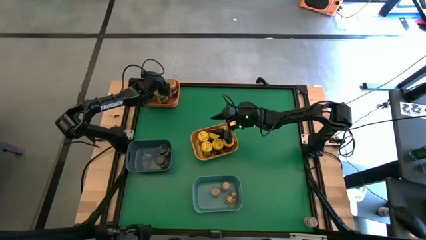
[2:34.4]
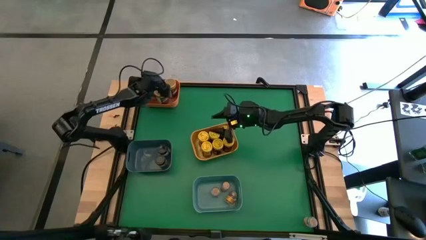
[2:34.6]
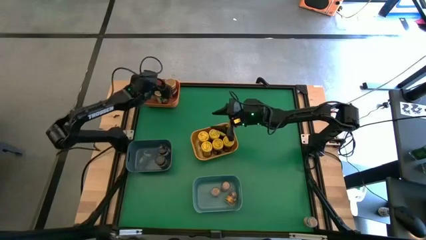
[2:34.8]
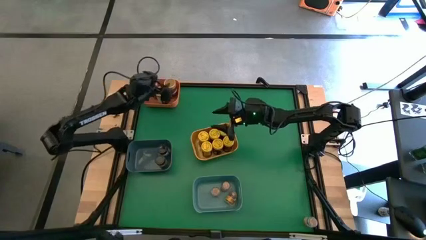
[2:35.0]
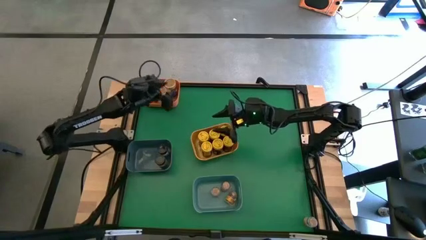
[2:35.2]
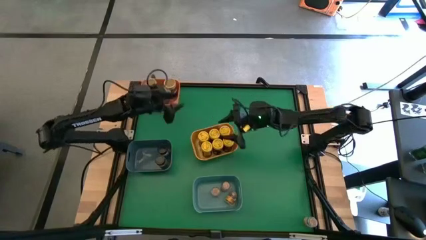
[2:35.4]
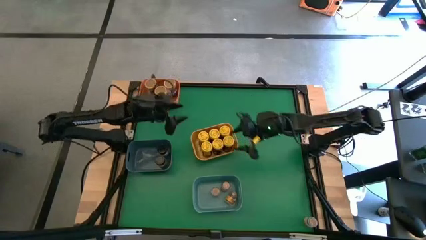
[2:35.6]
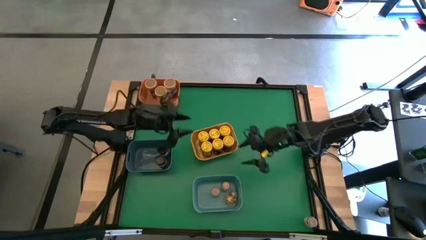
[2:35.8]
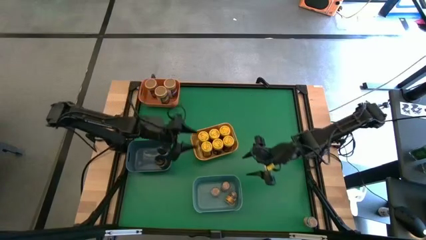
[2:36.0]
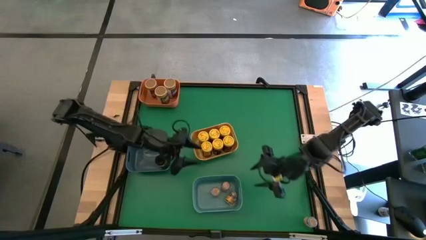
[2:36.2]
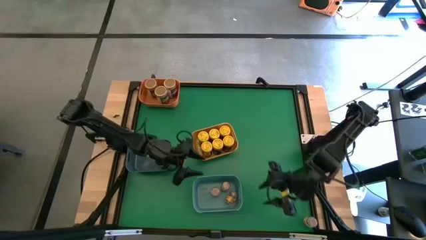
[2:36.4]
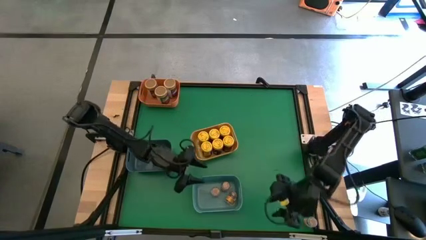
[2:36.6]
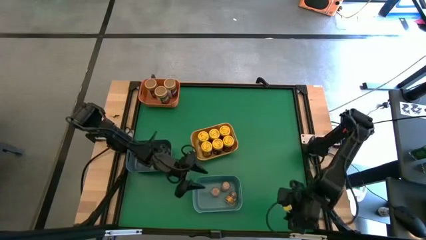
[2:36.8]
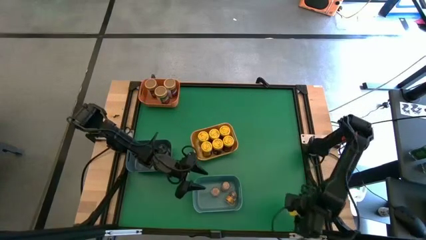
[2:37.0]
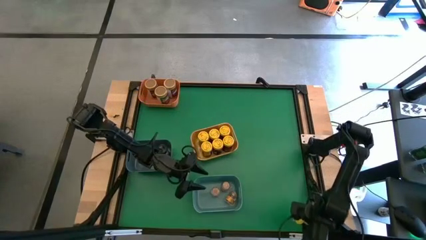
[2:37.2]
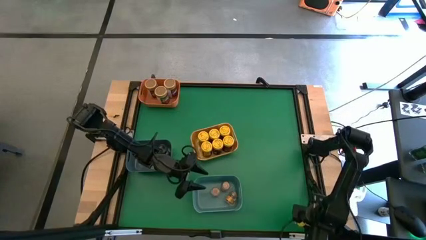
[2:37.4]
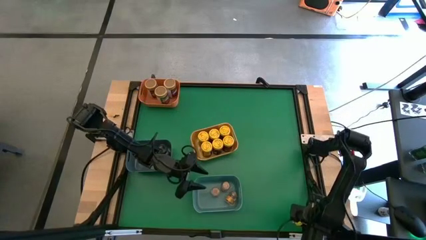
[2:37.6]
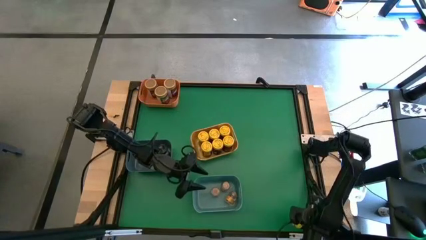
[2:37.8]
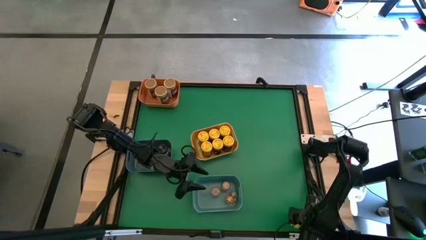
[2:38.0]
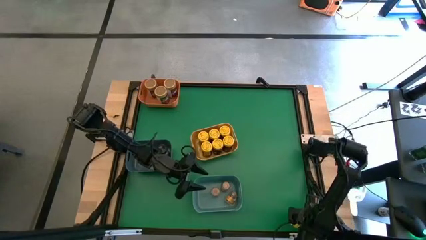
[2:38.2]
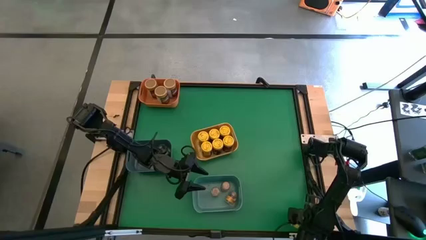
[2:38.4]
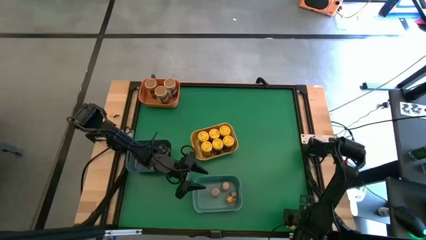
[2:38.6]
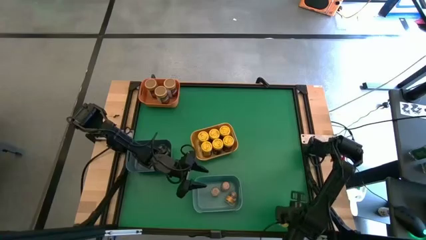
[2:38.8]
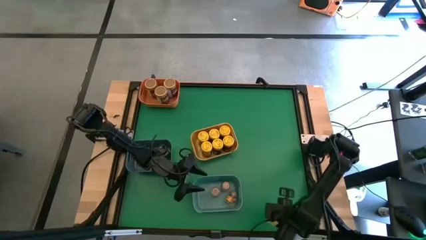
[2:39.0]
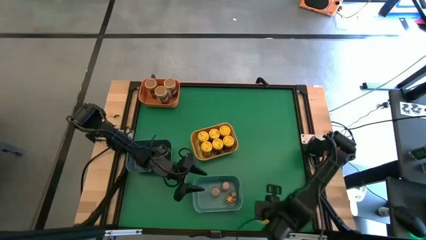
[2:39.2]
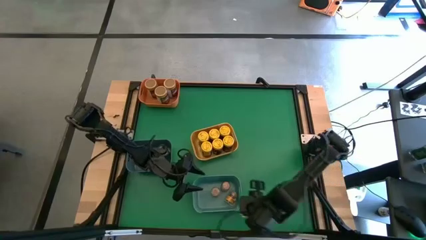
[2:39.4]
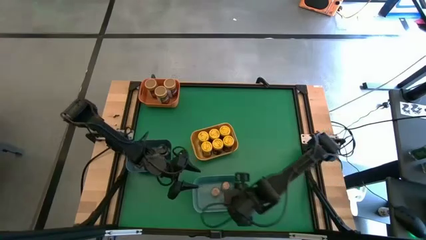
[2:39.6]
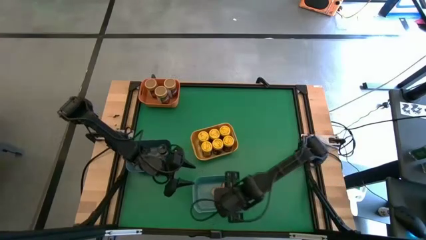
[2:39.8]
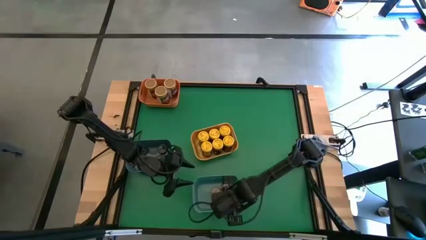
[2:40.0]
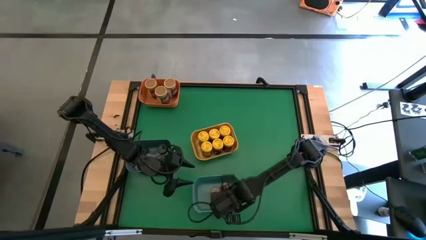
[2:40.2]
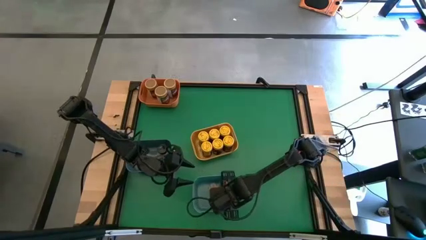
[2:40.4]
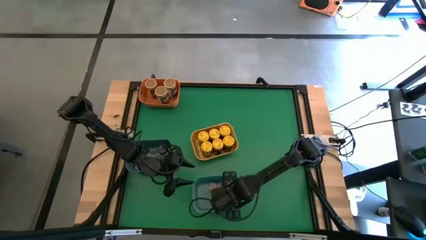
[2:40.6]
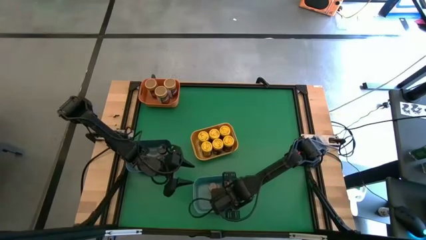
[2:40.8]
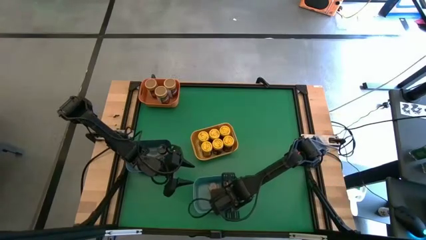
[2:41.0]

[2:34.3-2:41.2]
Task: Sort spices by type
Put the white transparent seasoning bottle into the light blue bin

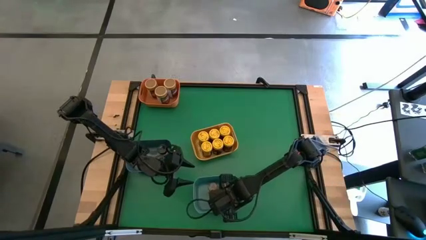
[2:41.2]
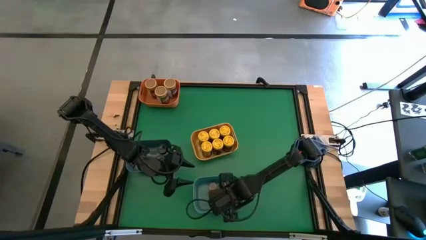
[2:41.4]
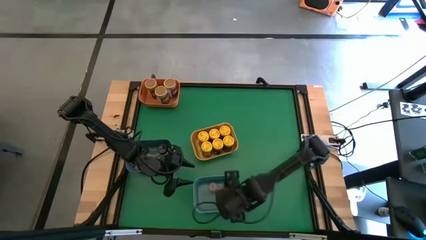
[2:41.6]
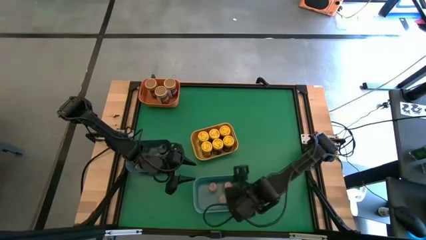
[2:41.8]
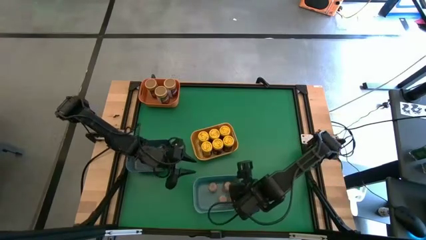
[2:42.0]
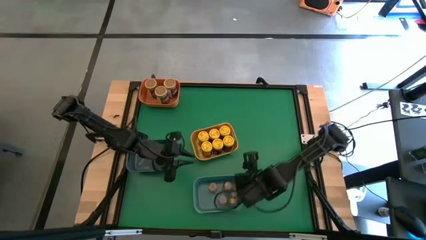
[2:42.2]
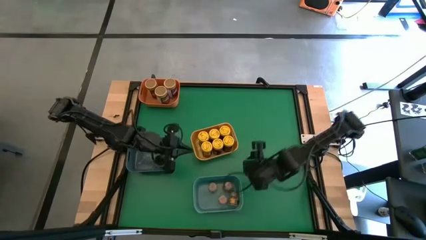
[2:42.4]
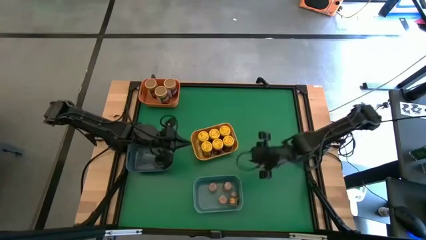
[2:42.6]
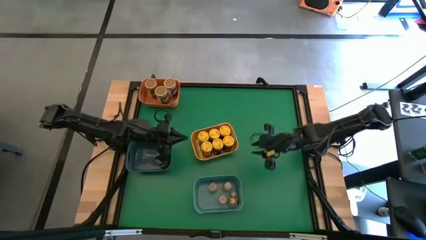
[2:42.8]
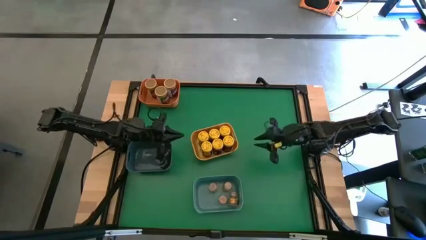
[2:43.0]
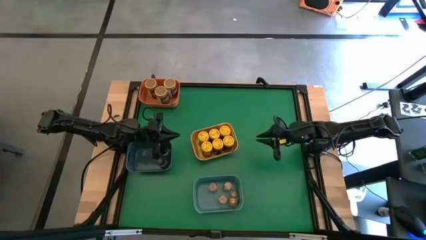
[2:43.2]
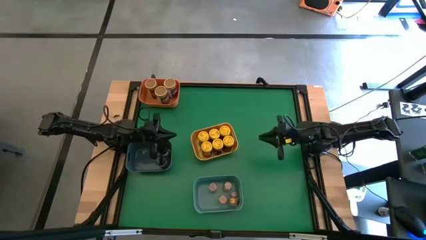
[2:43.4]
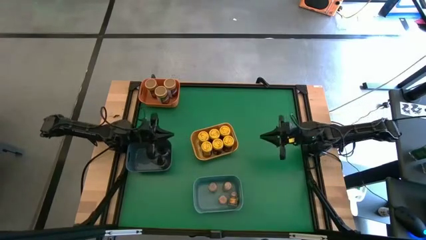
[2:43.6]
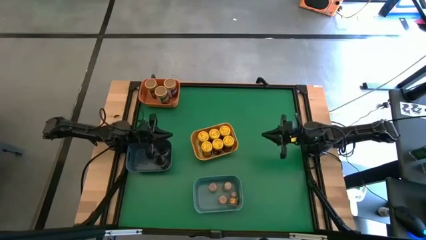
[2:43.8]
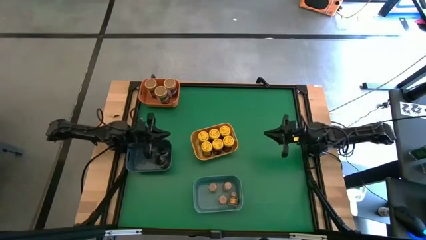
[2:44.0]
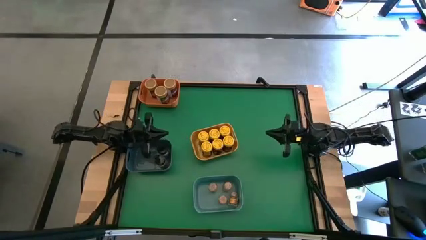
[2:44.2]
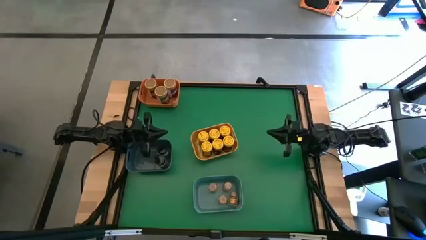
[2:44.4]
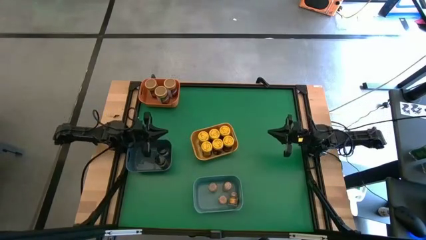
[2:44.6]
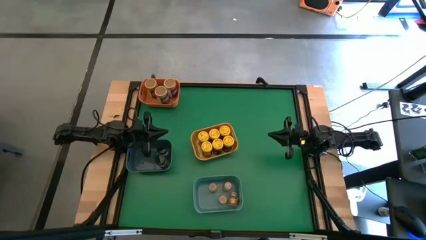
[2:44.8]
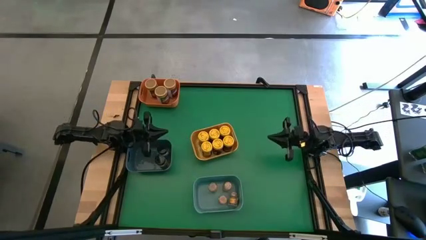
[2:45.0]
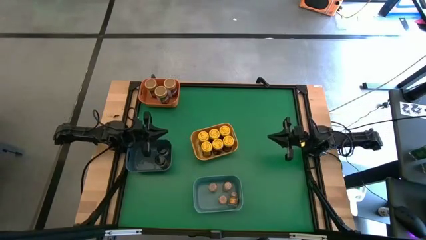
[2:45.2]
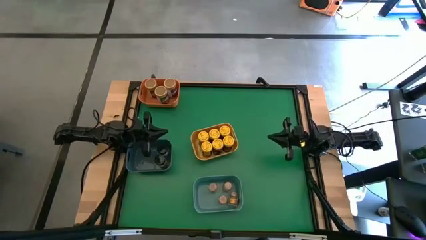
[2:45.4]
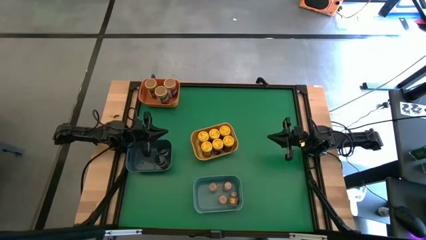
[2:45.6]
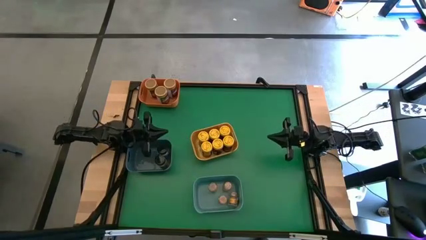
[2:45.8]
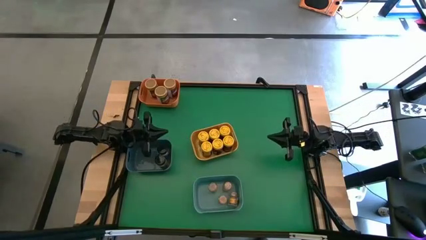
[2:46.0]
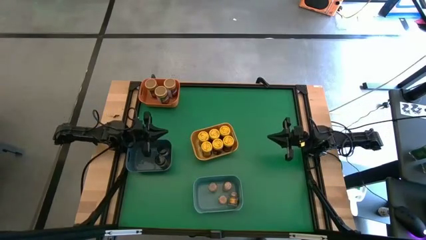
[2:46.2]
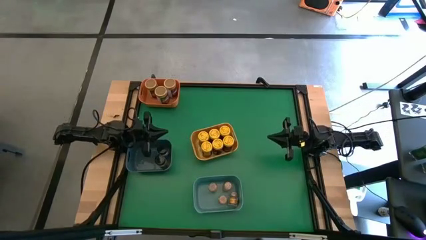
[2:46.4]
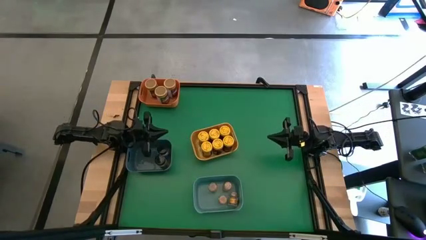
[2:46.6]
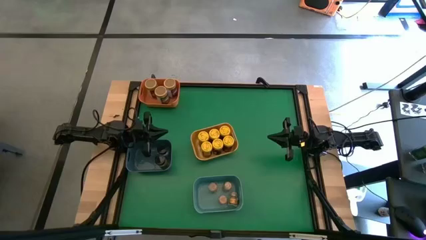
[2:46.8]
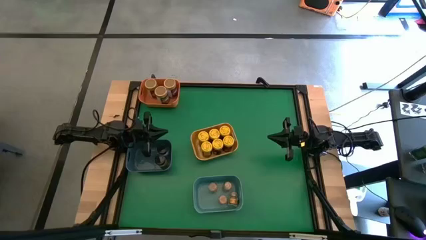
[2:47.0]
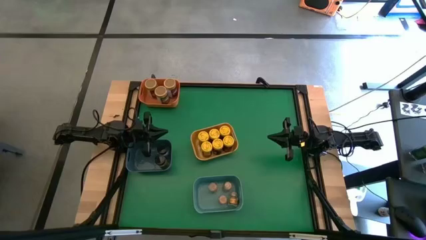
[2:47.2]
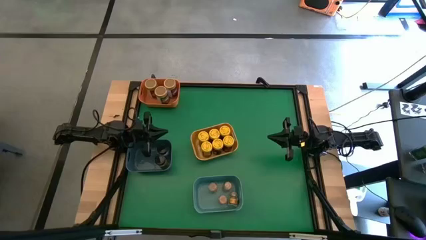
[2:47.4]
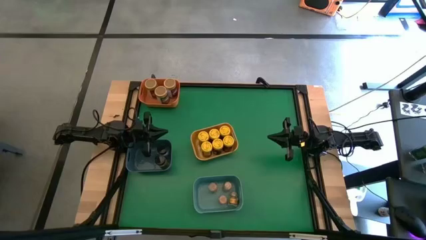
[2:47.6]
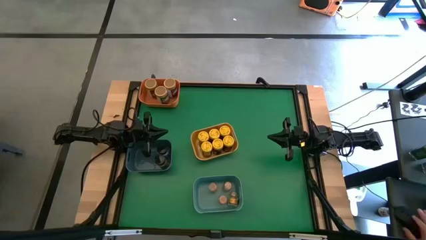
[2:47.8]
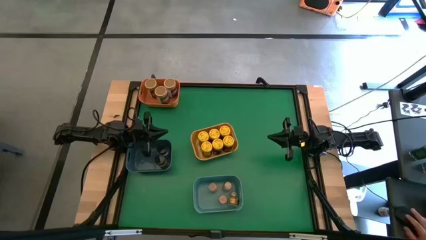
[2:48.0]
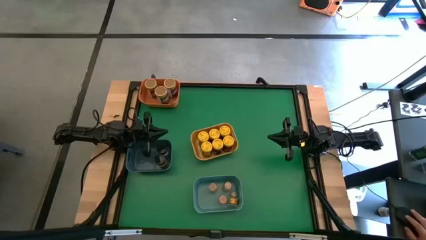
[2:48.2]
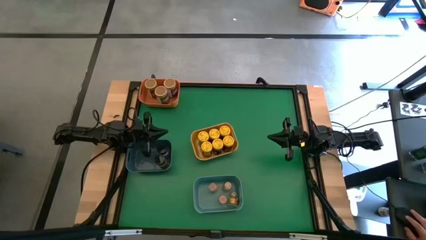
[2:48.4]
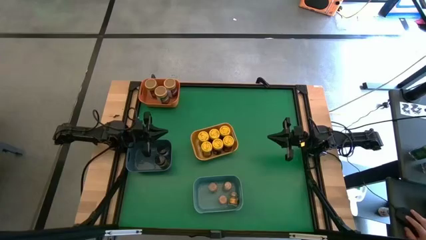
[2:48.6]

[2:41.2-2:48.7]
Return to Home Position

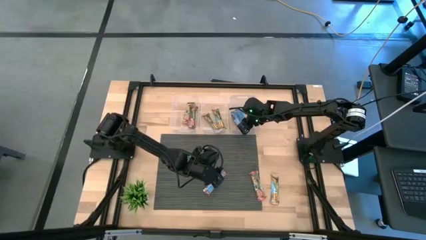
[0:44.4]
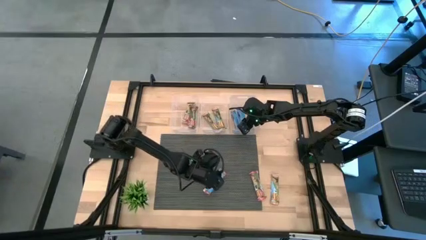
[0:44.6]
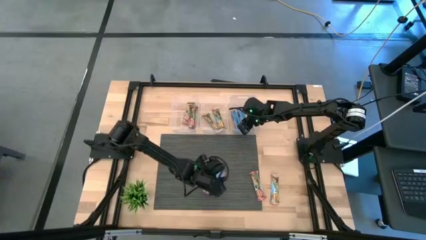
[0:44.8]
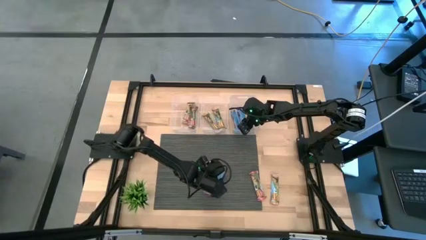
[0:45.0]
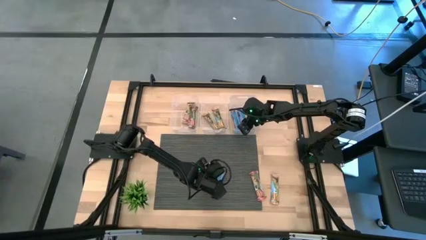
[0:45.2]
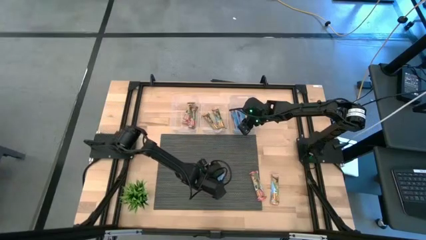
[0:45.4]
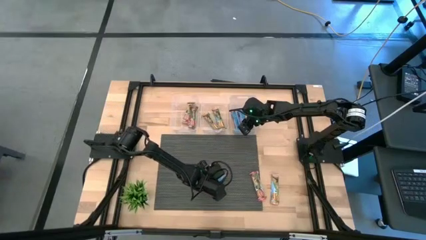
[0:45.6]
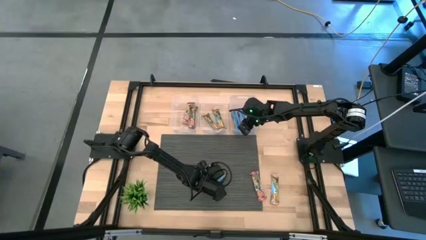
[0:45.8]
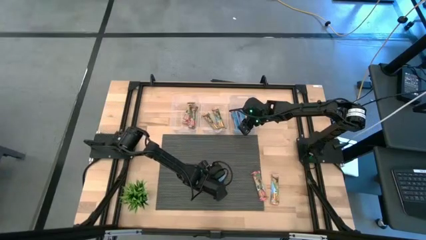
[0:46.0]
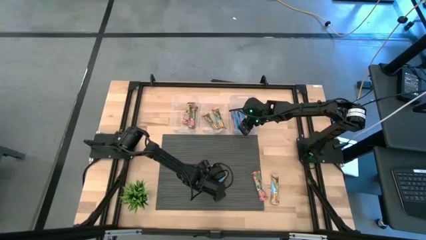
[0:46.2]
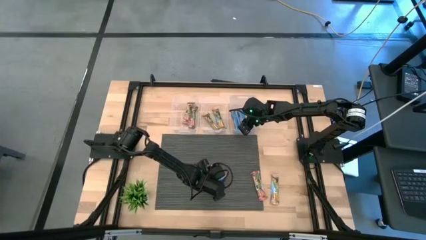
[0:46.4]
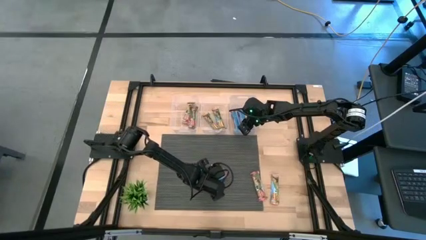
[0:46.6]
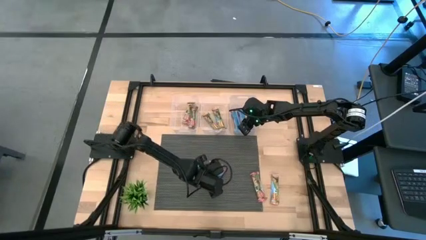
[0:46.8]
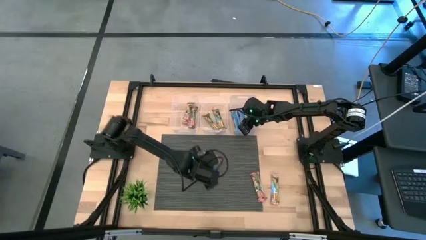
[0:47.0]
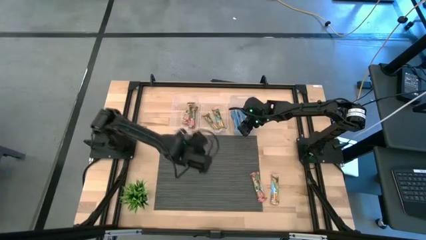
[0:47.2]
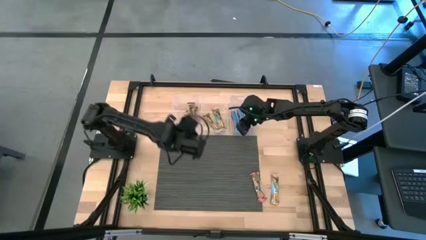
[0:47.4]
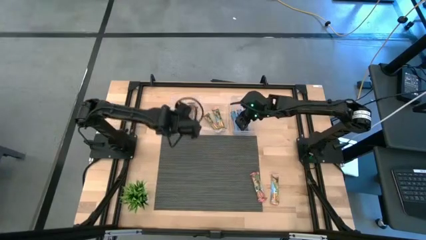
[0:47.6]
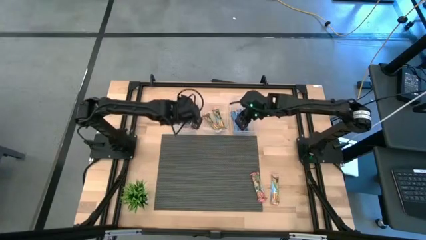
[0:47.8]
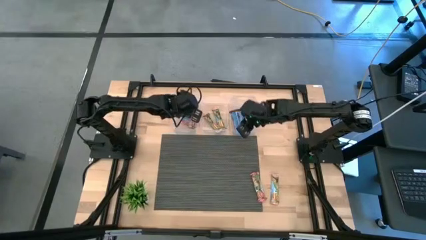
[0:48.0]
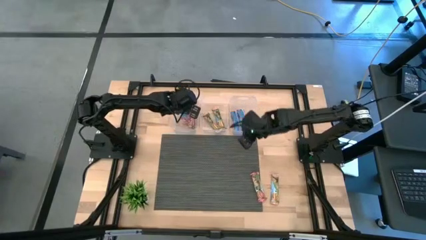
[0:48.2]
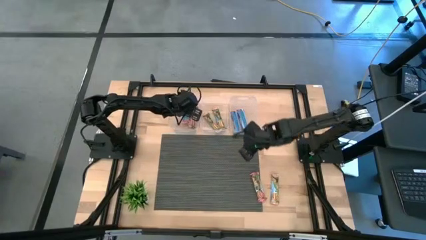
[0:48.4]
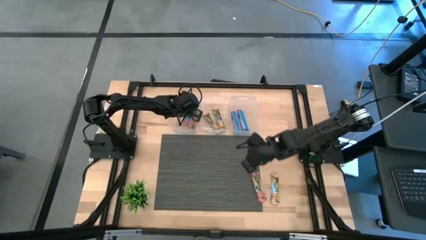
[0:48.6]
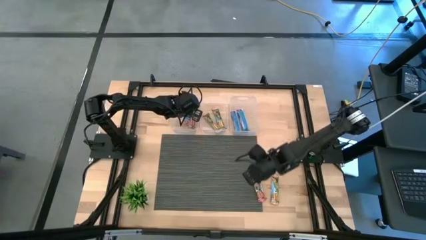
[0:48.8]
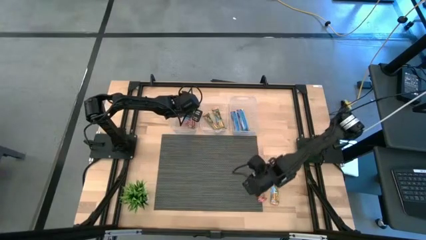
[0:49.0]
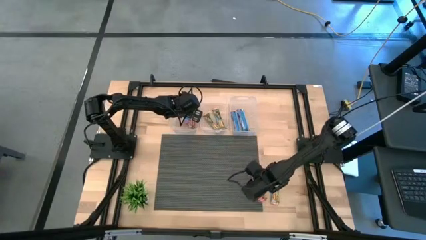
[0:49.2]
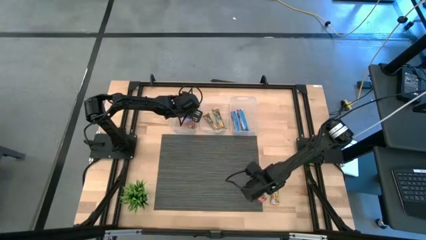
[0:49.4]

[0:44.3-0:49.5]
Task: Pick and place Granola Bars by type
Put the left red granola bar into the left transparent bin
